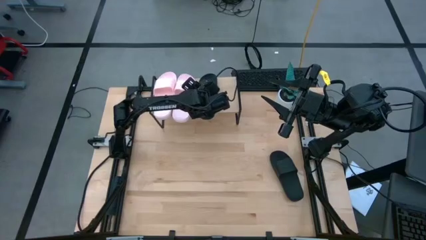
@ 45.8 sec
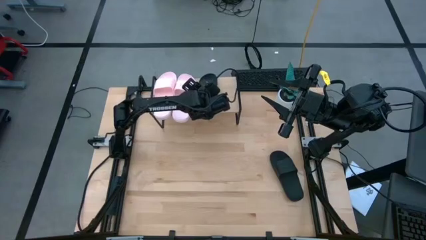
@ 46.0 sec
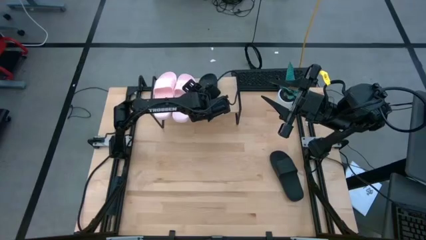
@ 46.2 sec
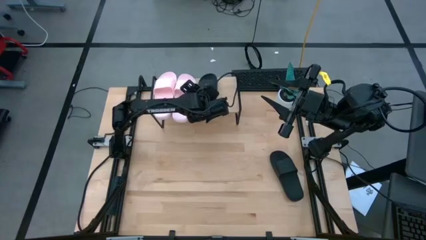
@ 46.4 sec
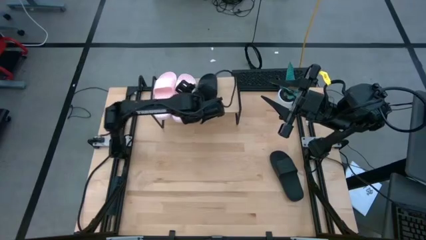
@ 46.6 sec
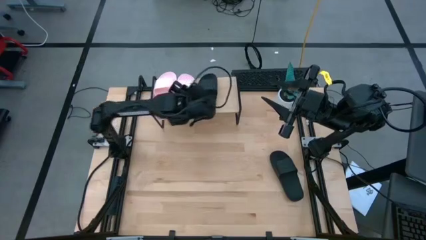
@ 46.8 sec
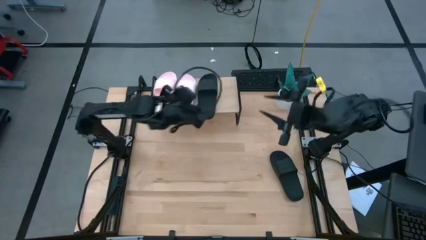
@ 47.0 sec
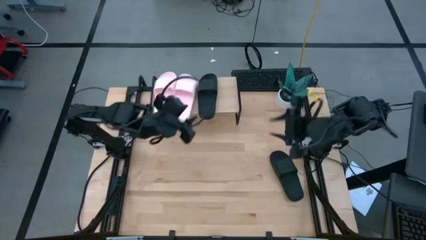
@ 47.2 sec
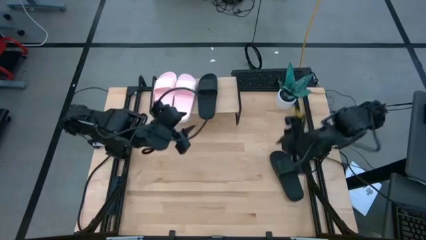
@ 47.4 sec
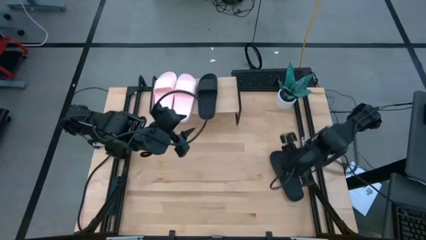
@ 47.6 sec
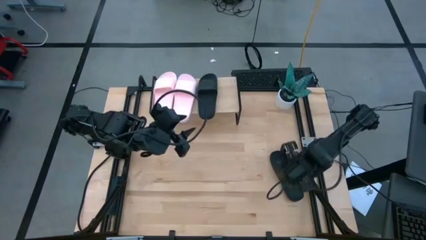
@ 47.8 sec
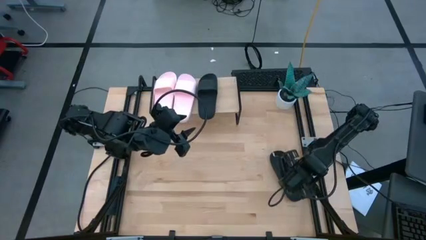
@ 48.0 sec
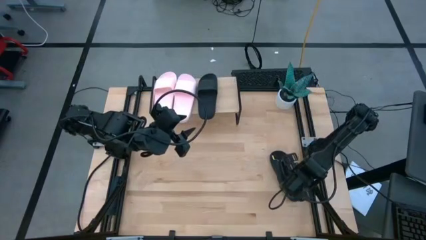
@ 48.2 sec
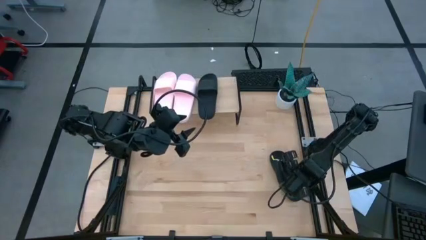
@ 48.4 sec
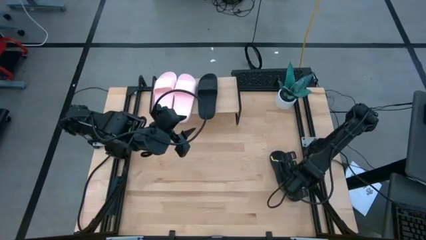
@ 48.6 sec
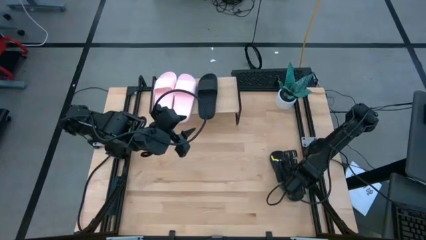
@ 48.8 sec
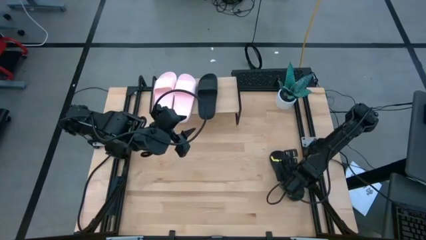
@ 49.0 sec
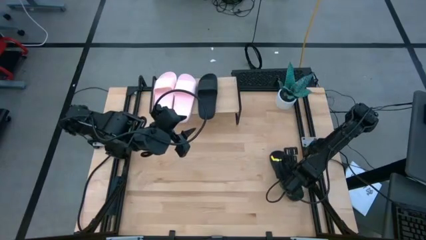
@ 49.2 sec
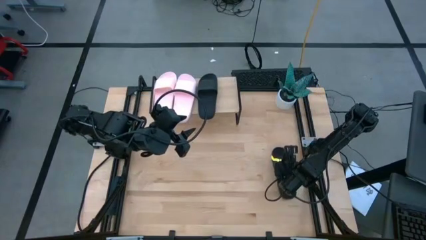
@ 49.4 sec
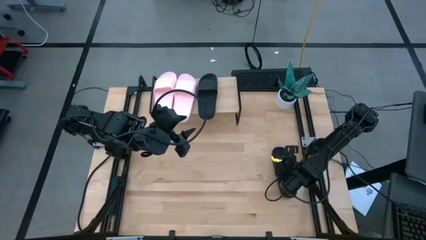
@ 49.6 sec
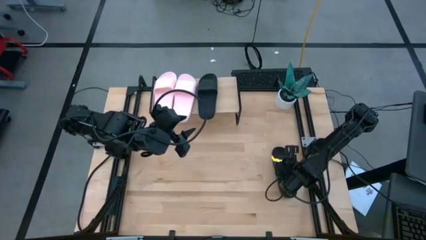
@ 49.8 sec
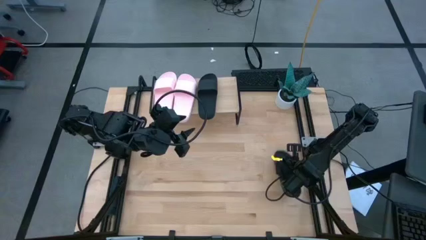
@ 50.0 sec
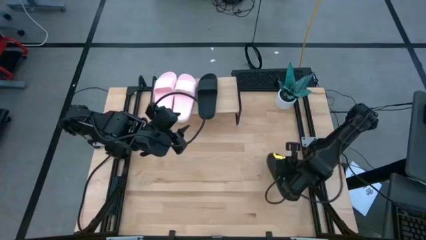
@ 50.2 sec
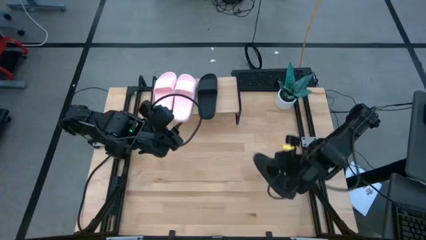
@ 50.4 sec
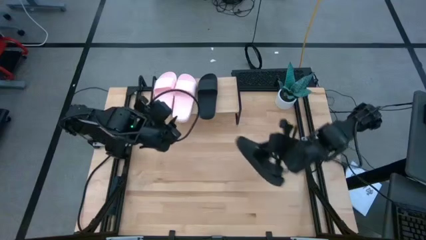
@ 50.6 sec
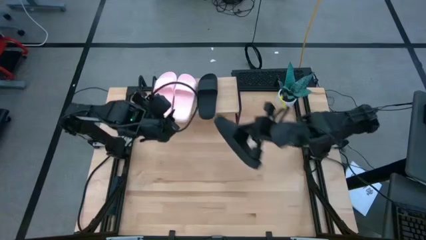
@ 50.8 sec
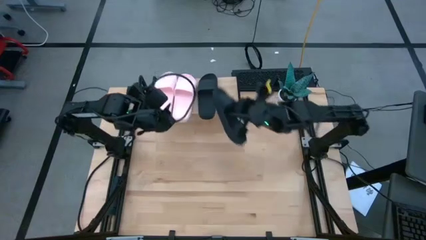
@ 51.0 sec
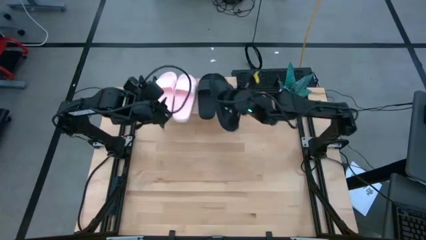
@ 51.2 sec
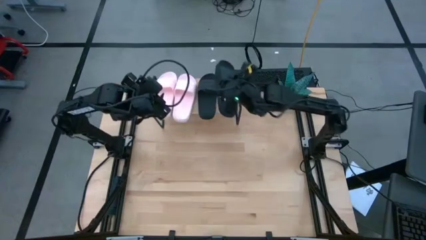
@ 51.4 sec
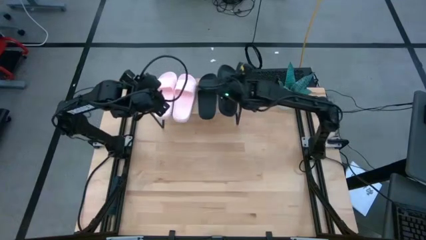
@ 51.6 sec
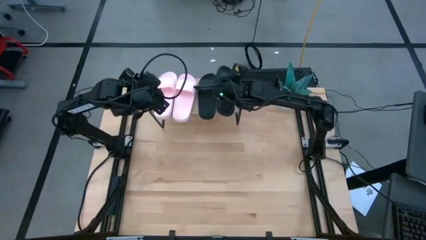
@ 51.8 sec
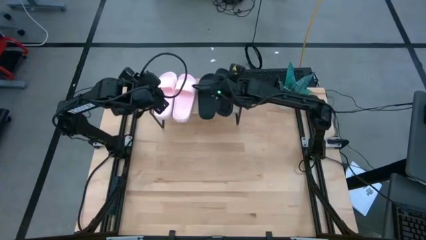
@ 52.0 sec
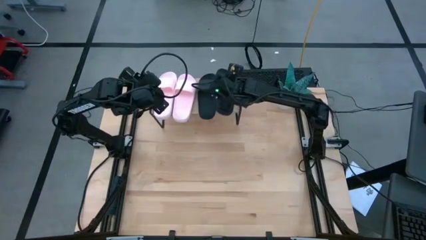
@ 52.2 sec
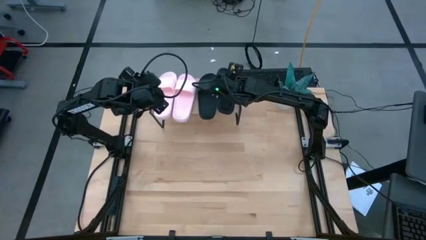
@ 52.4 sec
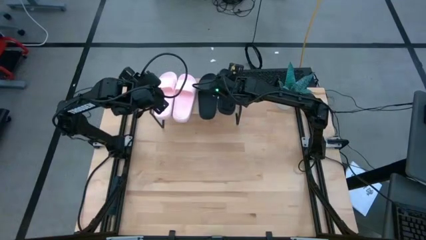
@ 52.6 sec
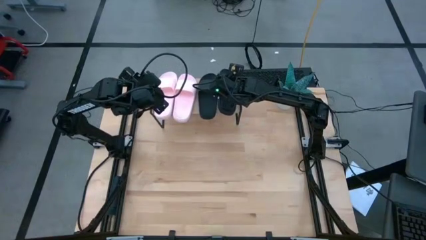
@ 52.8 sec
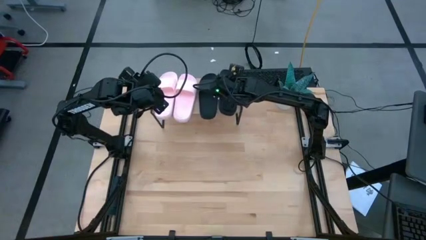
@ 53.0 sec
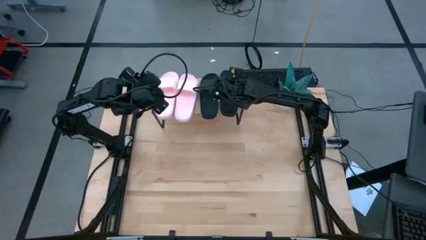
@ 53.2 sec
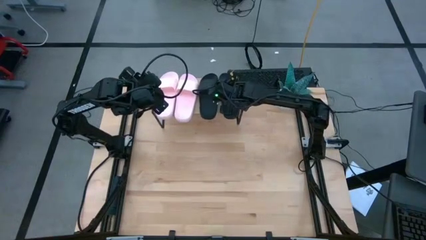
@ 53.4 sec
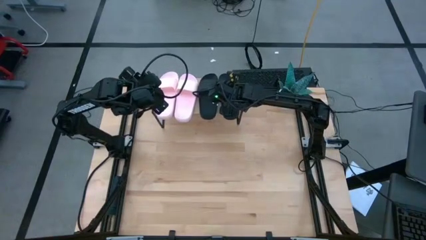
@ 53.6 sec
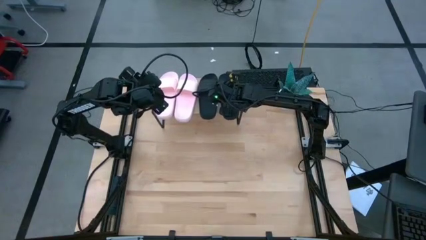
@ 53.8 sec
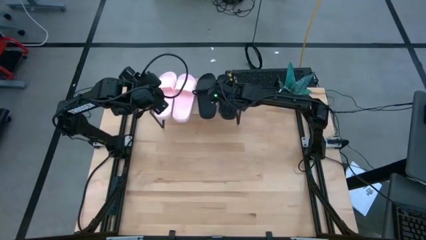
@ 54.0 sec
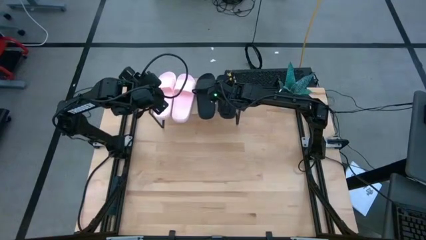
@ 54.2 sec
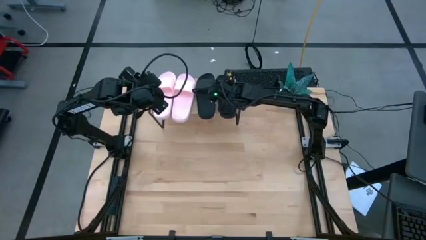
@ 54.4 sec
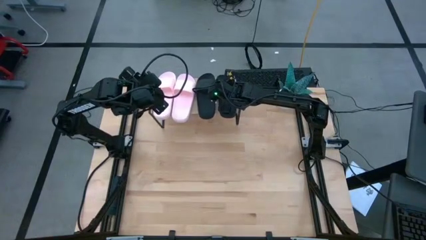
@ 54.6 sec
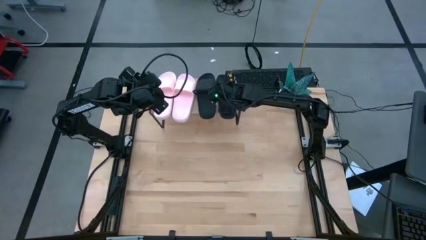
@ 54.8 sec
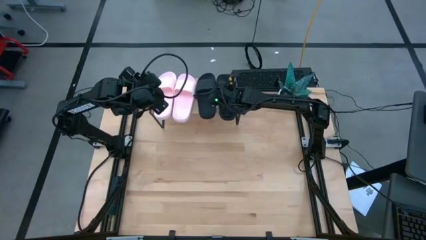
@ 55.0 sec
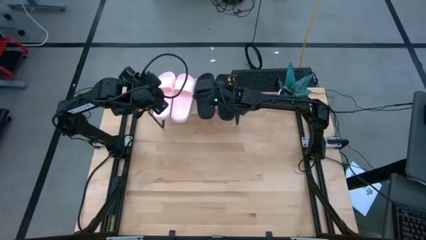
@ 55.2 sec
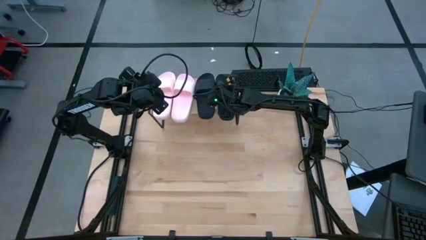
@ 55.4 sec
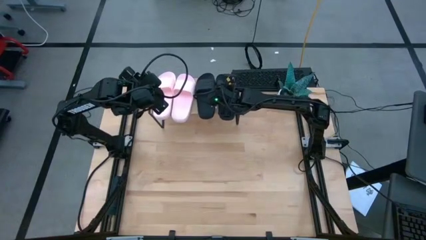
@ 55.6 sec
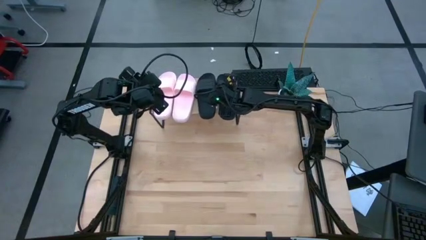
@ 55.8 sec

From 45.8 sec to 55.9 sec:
Task: Pick and place slides into the shelf
Put the black slipper on the shelf

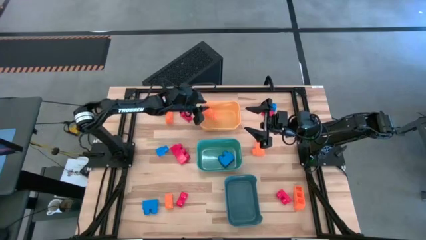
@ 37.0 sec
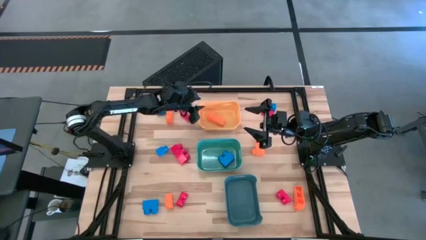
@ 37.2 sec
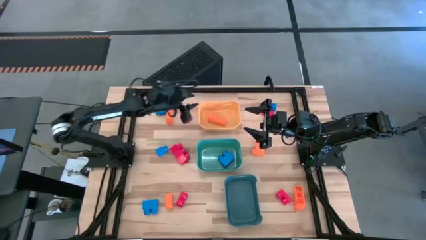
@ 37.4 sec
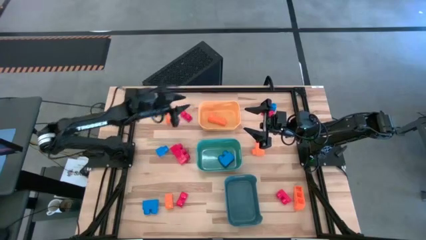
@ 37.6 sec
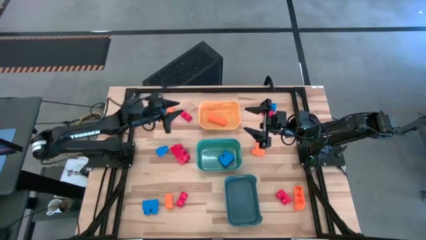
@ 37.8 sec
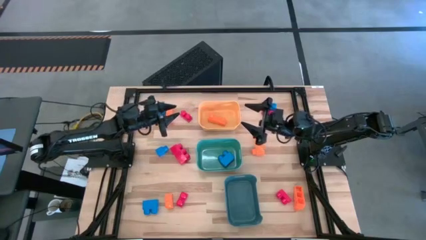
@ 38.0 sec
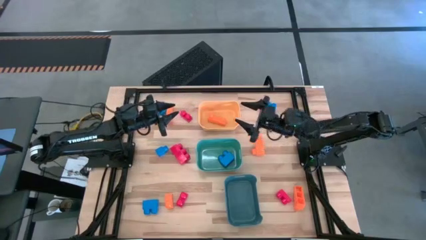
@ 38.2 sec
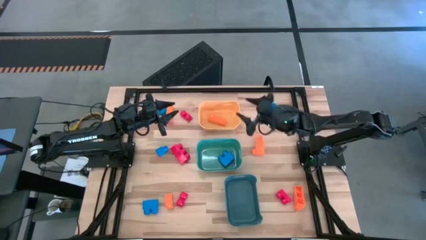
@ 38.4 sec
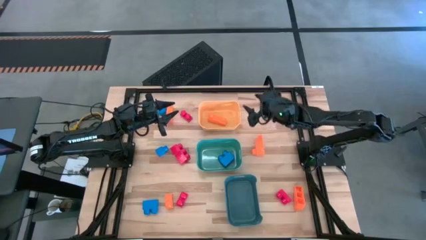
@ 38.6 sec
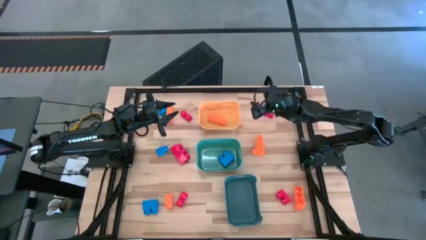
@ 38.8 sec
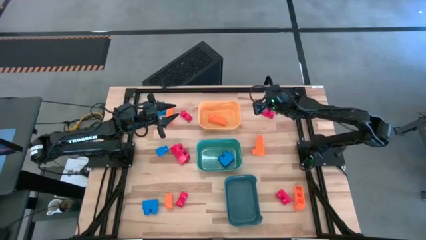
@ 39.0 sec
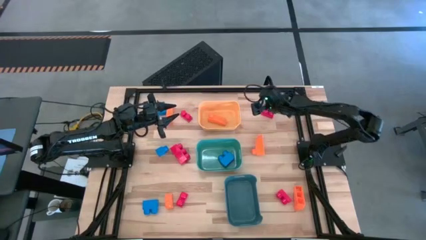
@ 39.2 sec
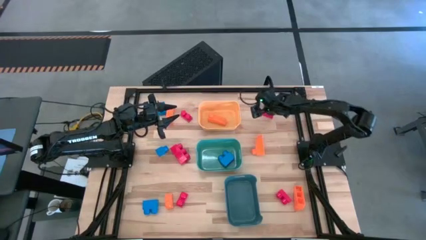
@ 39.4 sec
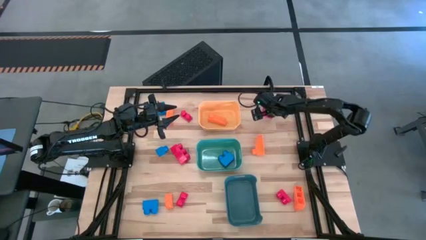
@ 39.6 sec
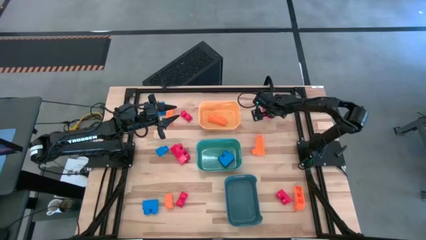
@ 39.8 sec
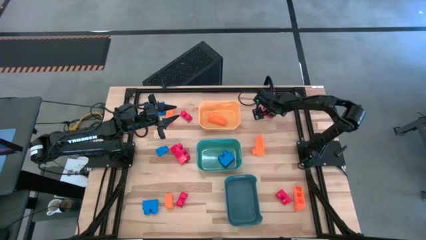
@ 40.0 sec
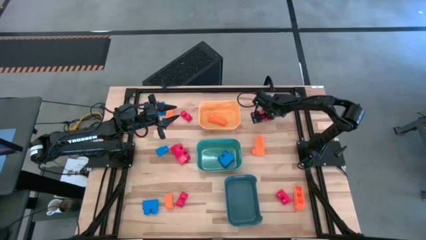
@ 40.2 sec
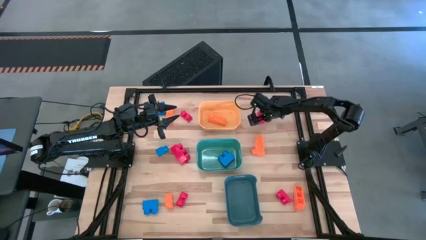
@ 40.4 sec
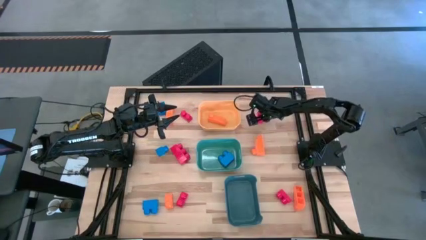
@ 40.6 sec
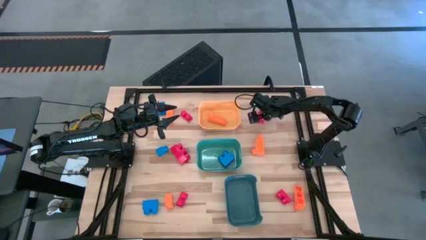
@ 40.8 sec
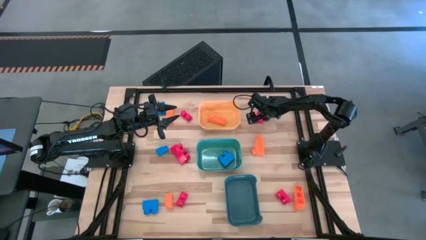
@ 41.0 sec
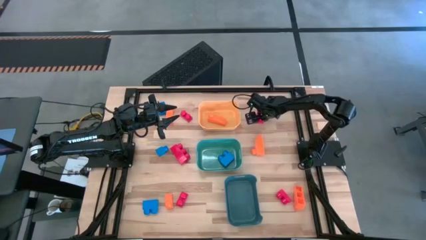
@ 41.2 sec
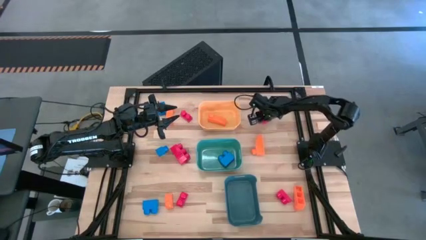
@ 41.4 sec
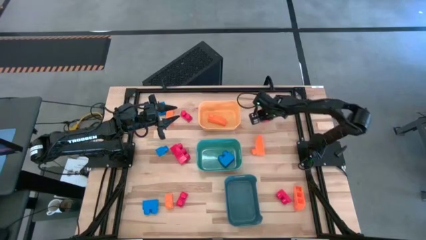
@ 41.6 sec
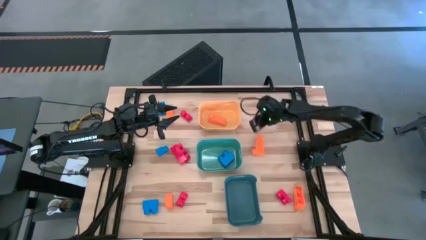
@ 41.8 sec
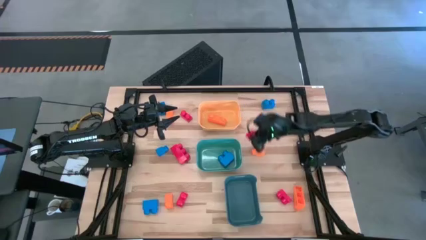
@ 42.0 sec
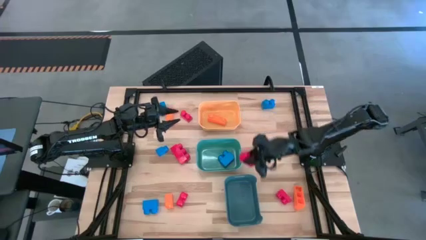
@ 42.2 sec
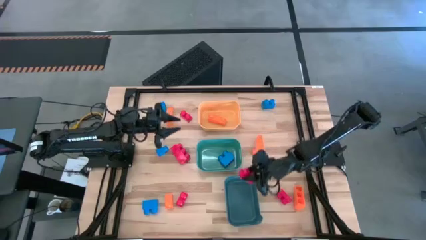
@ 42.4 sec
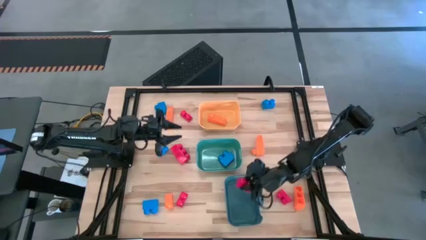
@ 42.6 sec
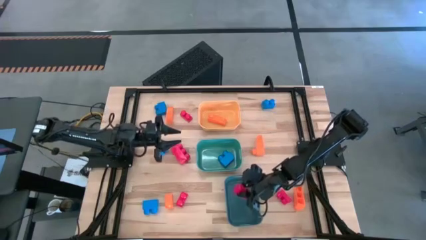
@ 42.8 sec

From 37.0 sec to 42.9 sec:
Task: Sort & place blocks by color
Put the red game piece into the blue bin
